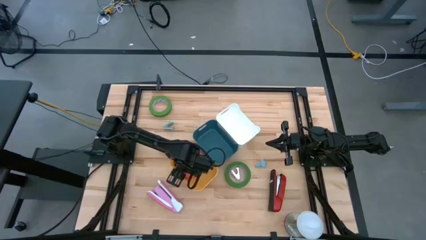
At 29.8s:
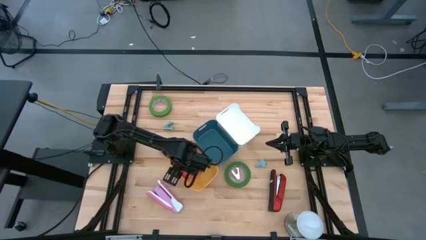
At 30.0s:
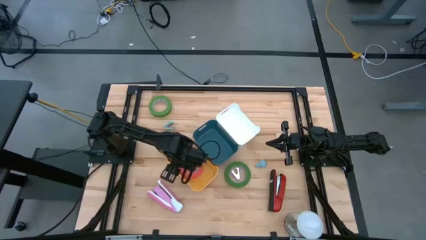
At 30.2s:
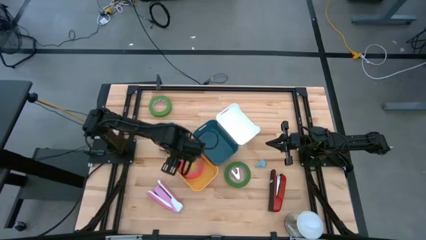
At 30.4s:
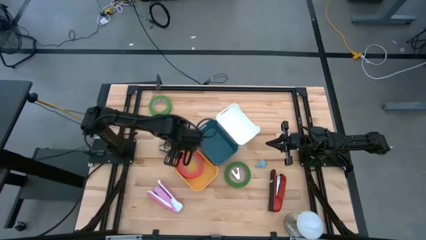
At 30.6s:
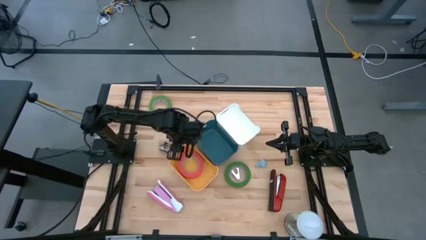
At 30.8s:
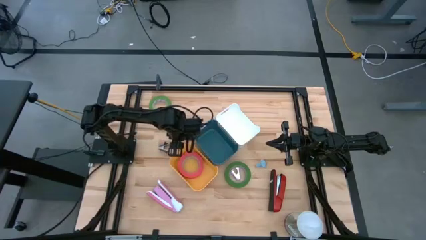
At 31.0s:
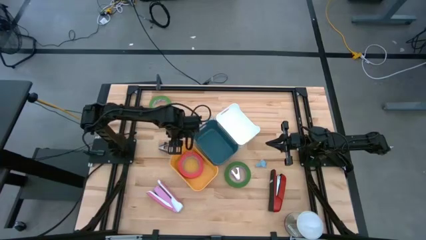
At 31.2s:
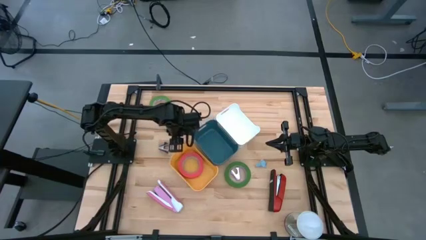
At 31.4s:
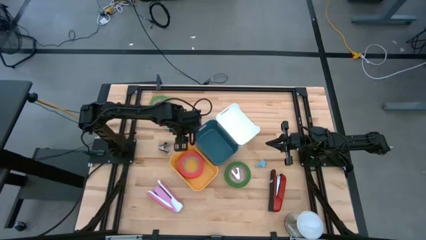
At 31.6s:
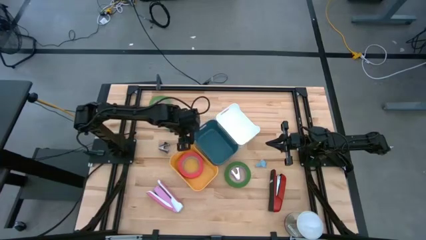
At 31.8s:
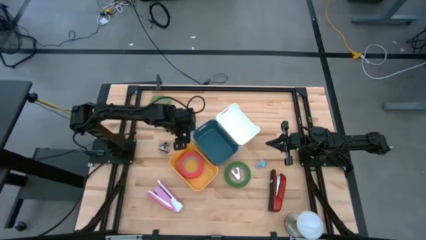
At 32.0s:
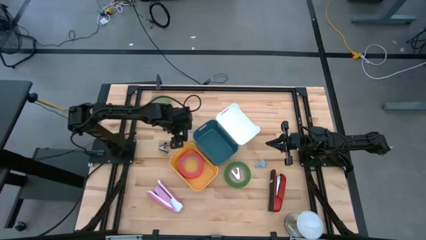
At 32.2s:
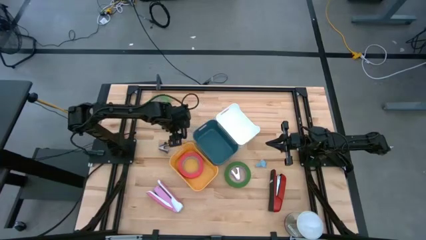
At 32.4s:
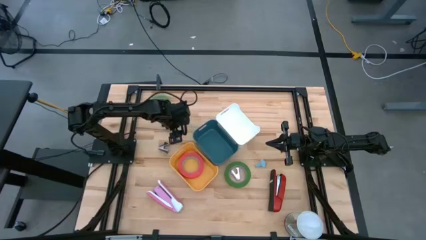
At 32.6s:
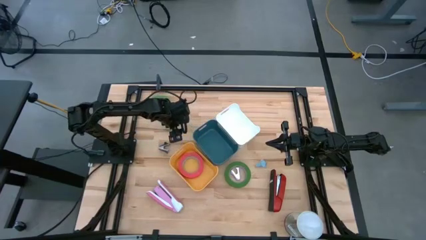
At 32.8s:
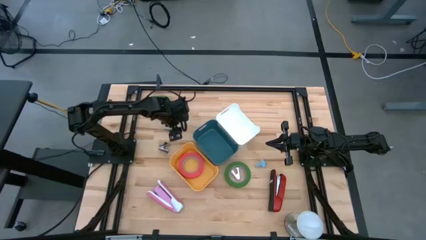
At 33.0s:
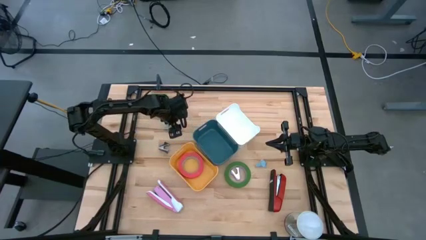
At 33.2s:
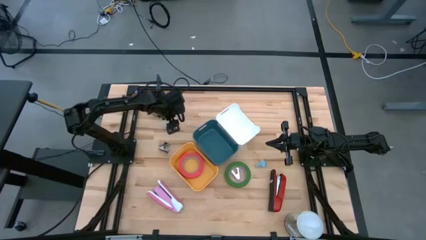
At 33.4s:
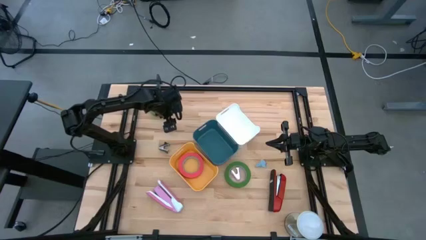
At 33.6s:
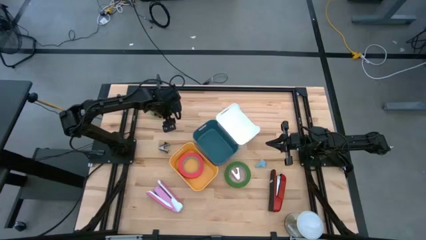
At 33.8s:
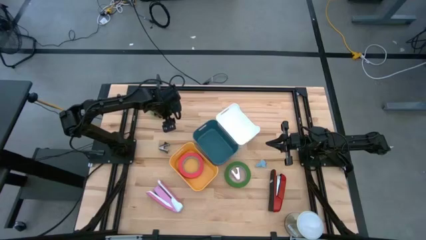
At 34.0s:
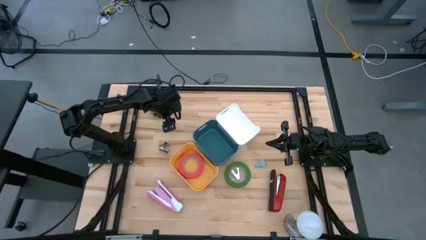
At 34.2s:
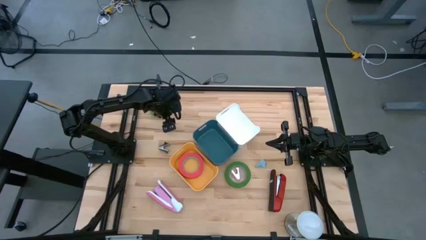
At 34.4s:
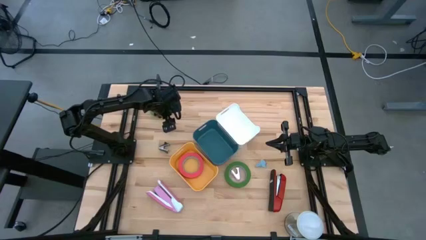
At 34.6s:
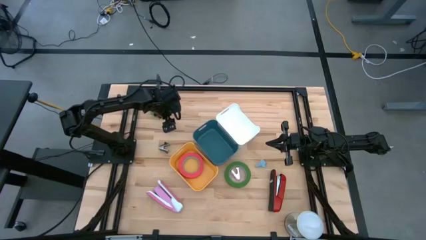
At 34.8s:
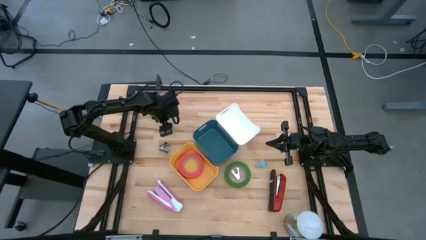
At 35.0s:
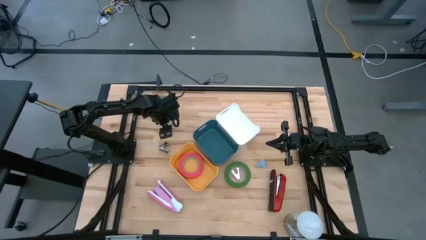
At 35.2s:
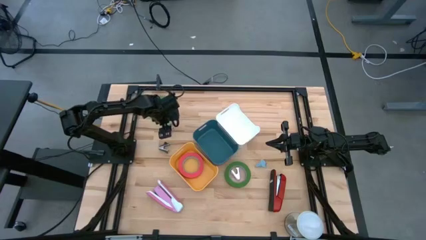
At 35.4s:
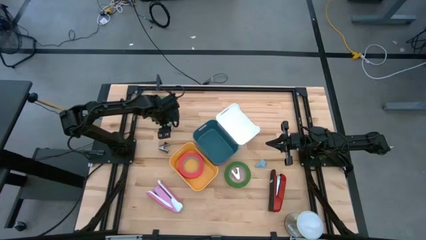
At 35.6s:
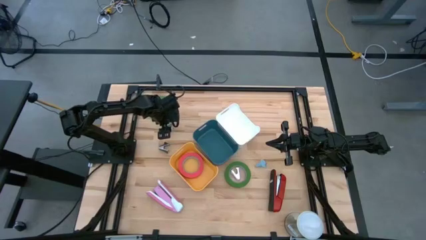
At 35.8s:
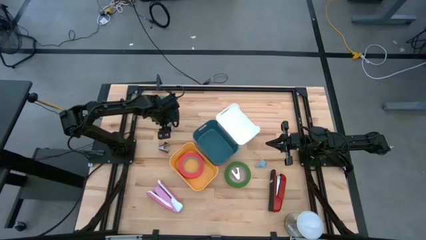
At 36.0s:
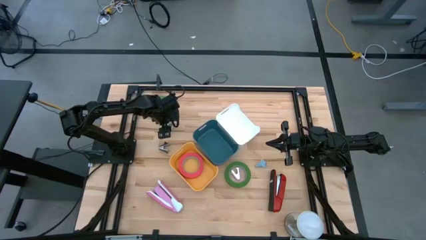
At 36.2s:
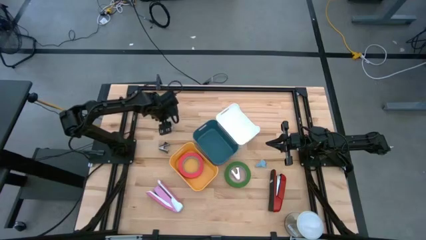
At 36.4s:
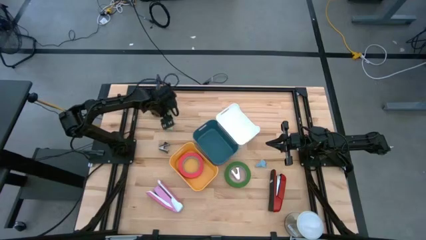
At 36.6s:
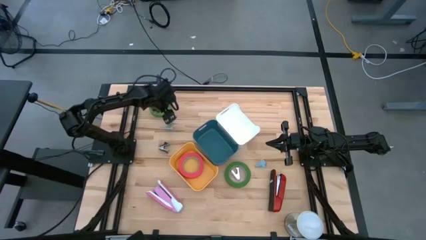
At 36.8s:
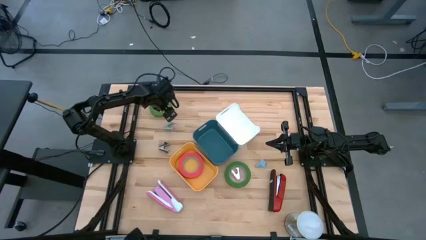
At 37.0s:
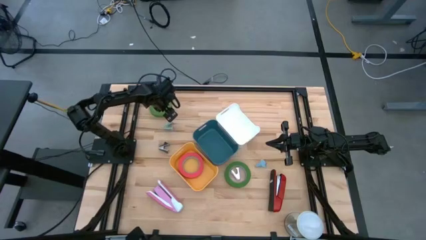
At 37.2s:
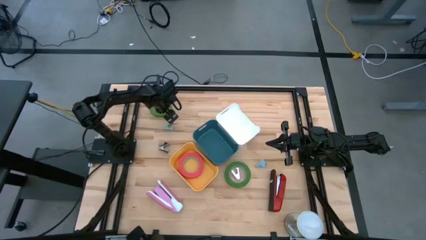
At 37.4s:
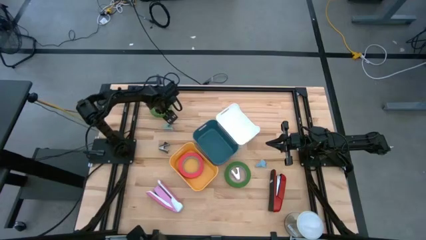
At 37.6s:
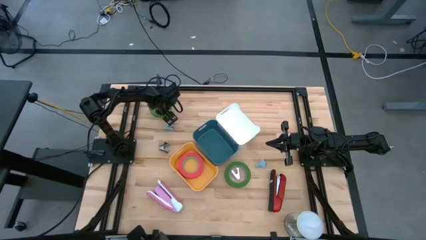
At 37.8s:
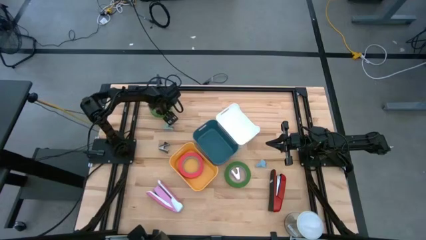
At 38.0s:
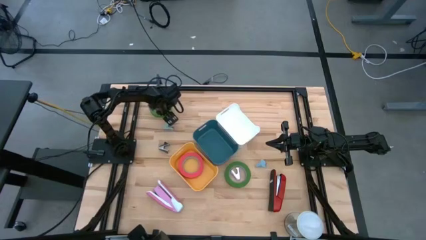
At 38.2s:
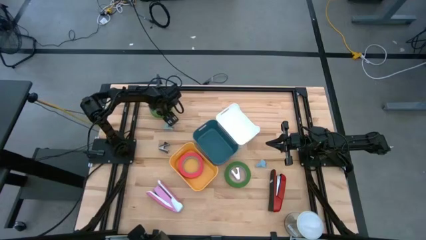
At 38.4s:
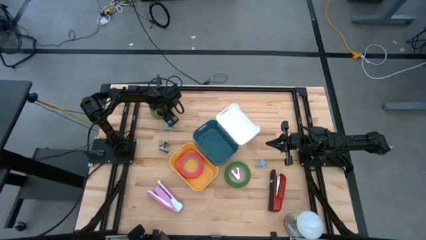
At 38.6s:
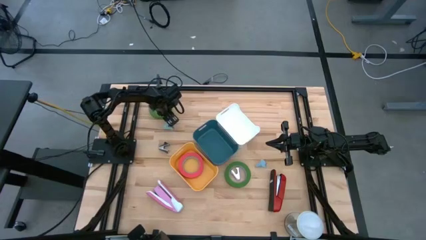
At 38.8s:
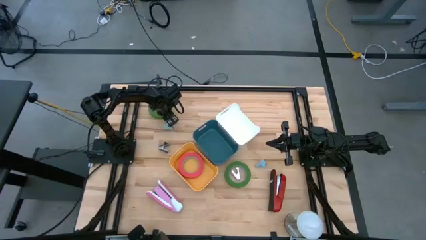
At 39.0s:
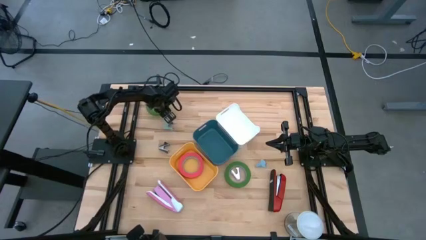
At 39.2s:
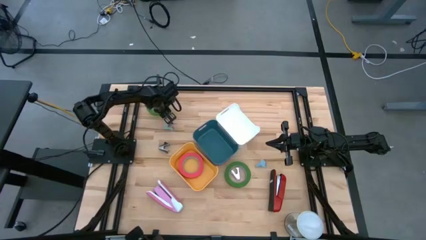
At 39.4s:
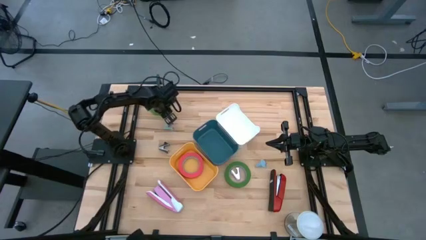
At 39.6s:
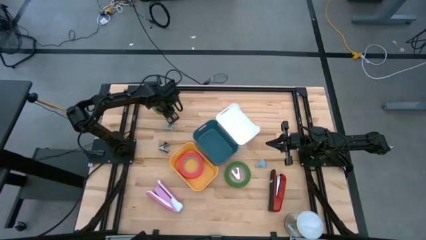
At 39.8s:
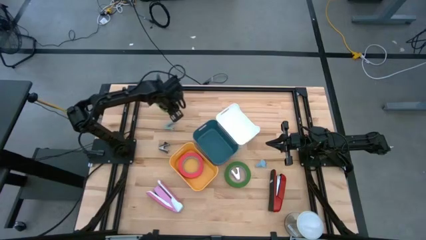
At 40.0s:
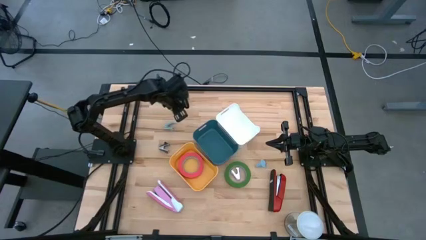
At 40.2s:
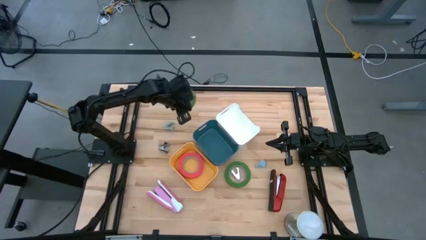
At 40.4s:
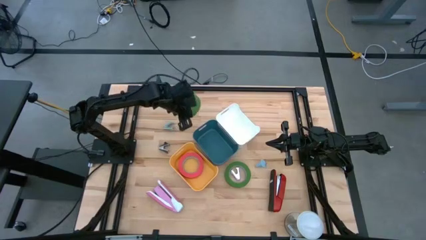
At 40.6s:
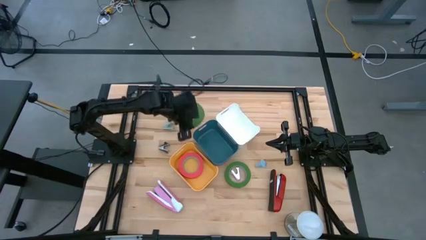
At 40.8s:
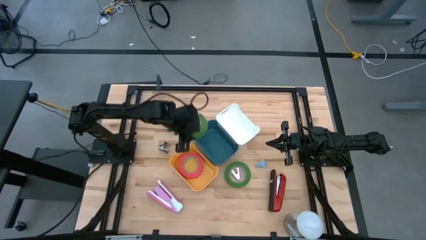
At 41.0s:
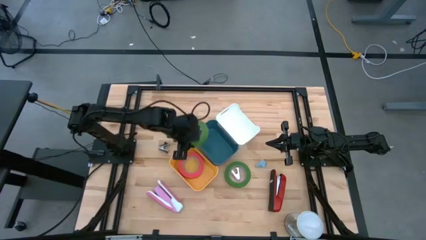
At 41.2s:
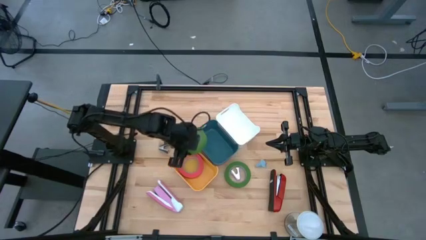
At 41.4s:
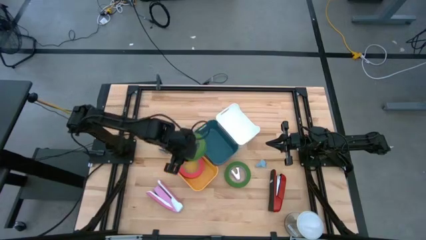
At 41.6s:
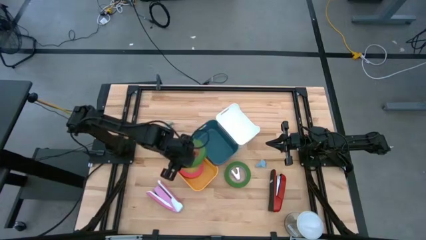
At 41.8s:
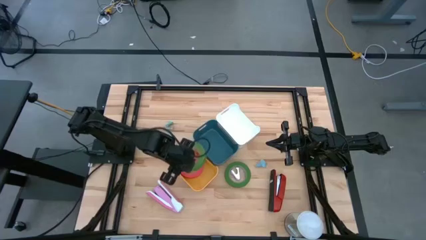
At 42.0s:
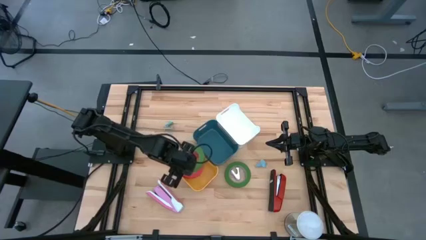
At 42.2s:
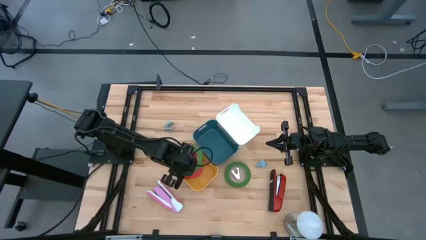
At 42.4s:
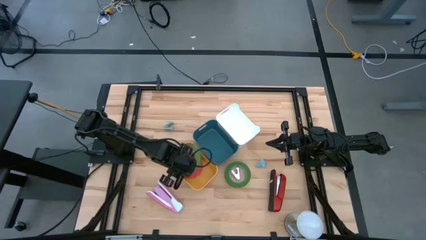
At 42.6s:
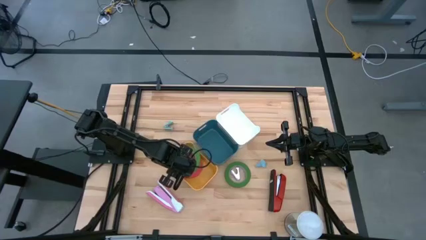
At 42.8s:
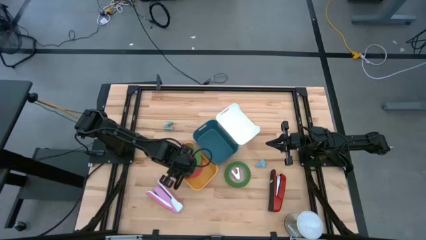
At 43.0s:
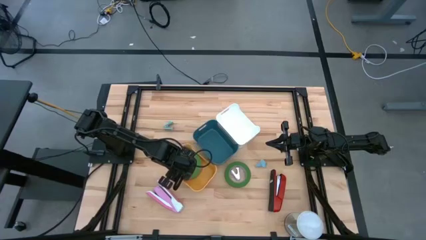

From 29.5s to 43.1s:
Task: Pick and place Stapler, Stapler remover, tape
Put the top green tape into the yellow bin

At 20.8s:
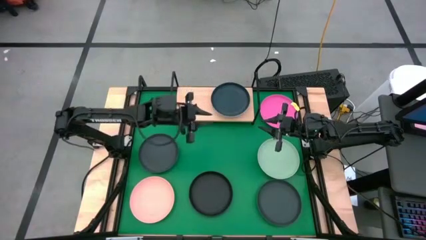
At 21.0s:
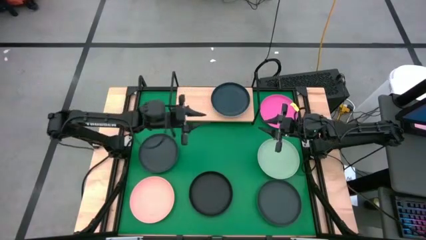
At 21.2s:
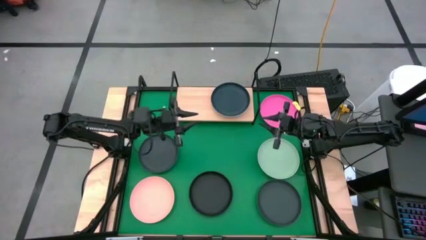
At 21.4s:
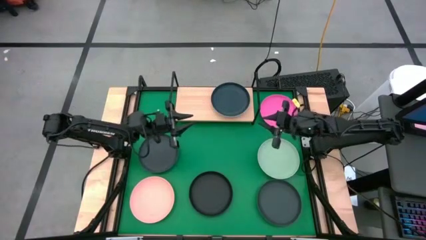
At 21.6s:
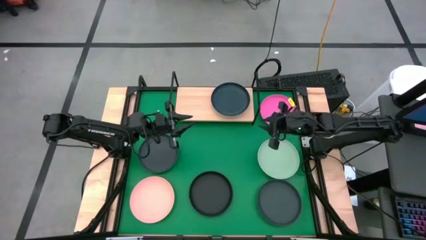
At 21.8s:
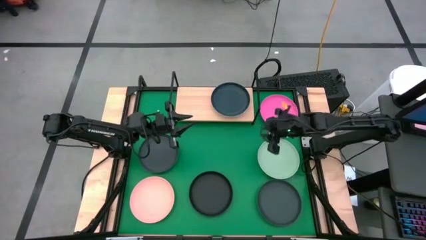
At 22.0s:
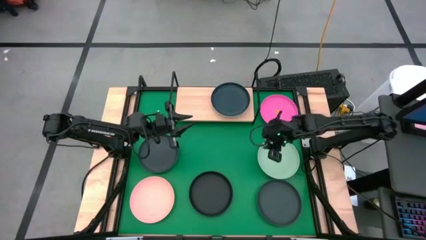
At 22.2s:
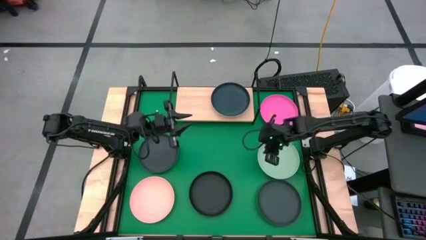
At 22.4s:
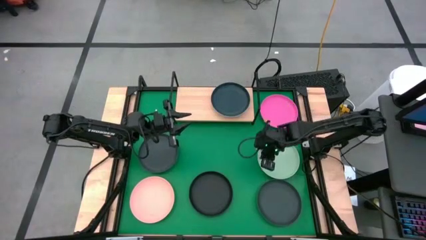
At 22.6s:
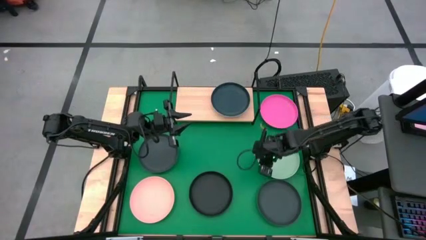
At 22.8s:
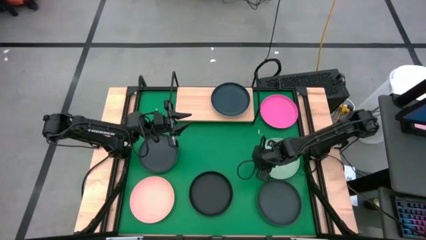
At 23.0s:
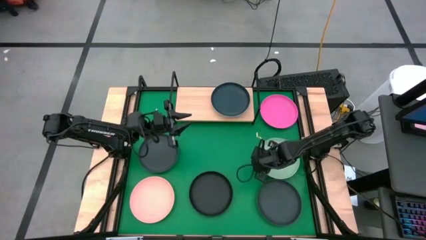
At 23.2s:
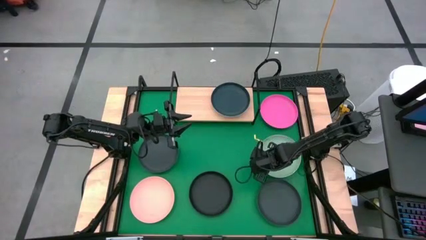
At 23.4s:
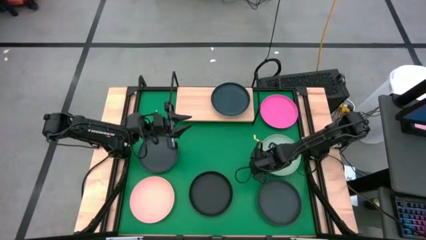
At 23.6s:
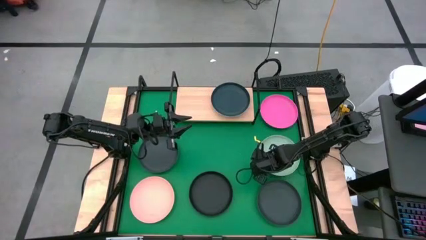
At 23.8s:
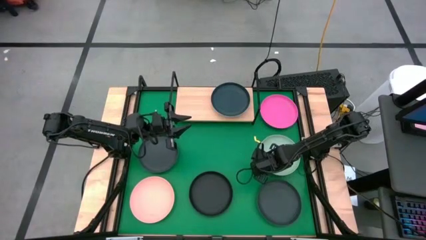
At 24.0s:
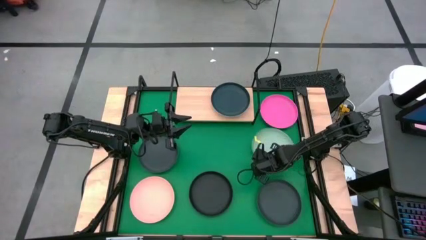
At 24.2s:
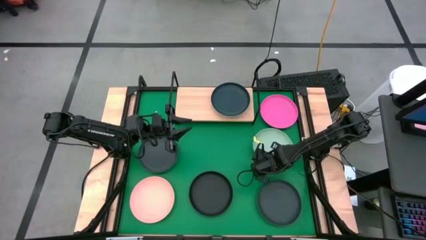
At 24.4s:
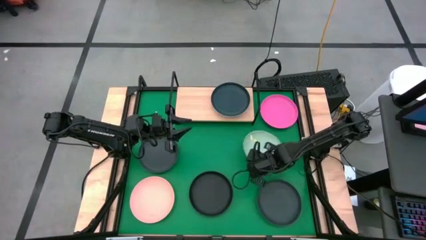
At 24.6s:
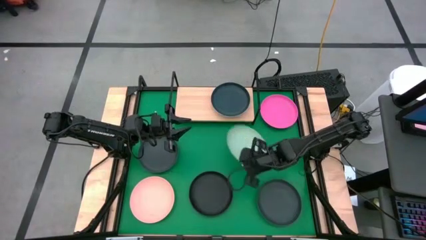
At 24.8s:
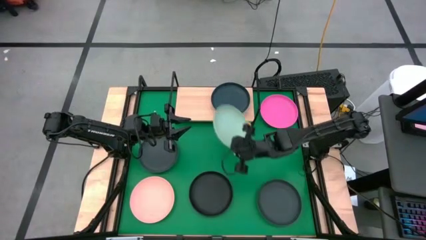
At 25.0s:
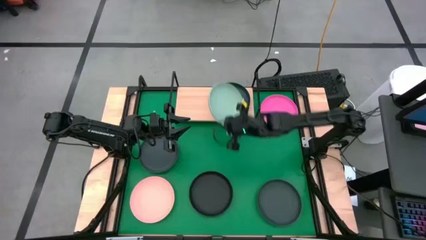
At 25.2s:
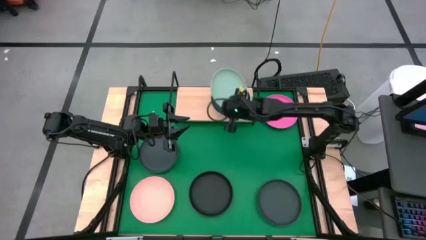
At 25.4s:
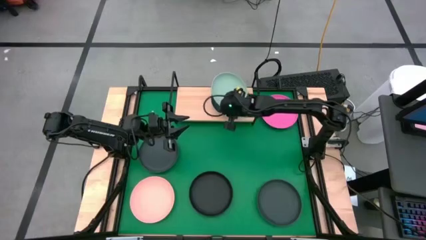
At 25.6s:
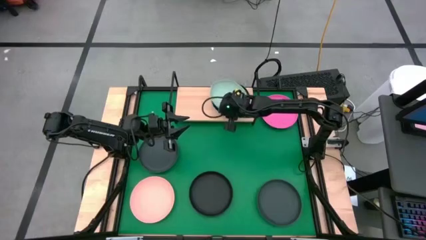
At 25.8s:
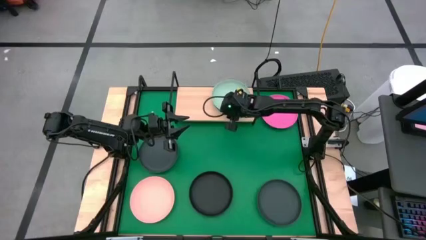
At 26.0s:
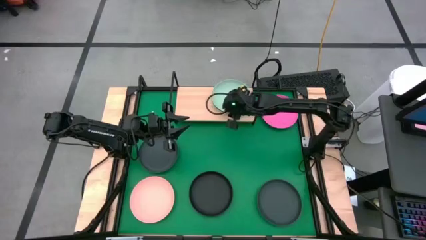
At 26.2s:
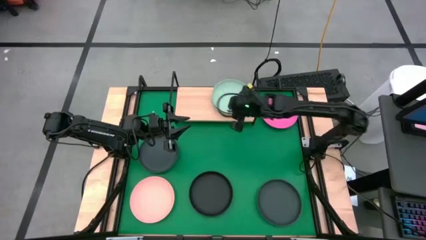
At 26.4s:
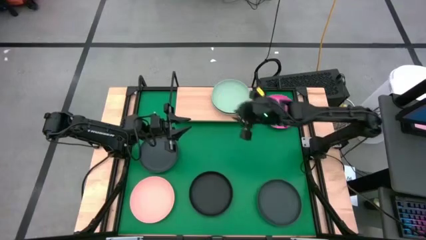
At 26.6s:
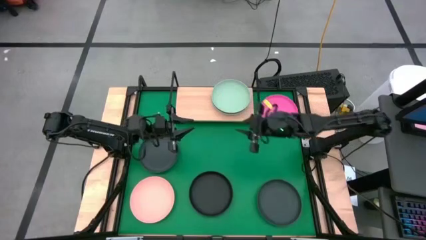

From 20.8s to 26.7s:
Task: Place and stack plates onto a shelf
Stack the light green plate on top of the black plate
